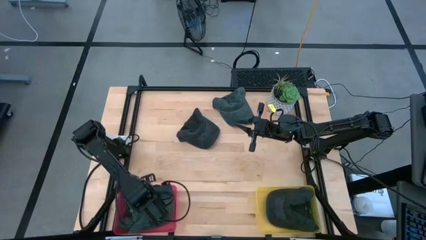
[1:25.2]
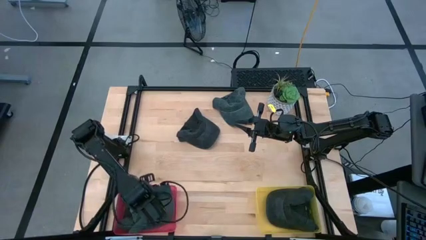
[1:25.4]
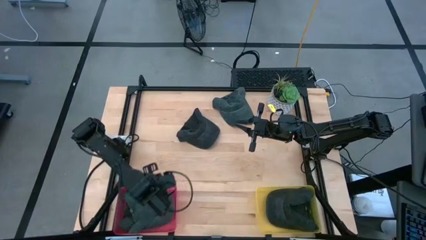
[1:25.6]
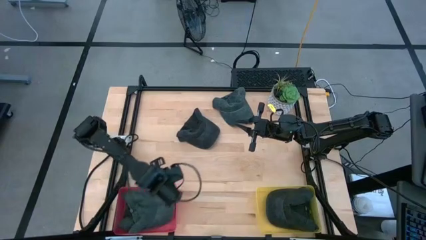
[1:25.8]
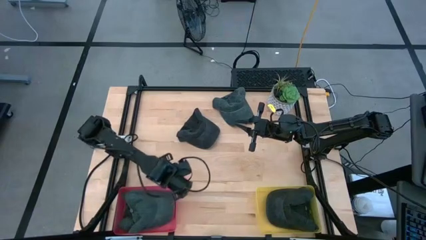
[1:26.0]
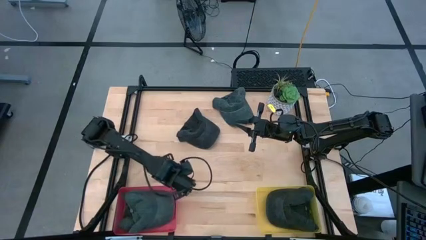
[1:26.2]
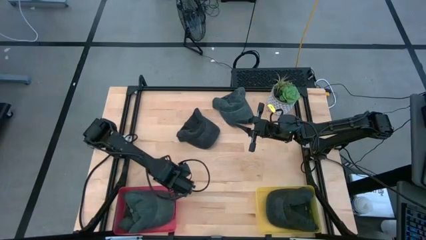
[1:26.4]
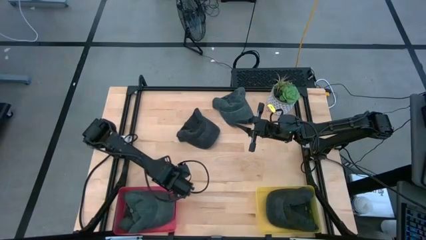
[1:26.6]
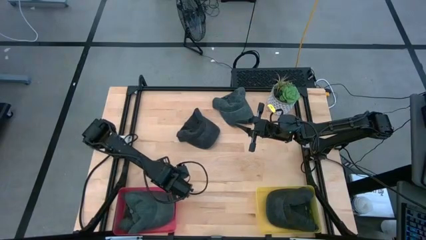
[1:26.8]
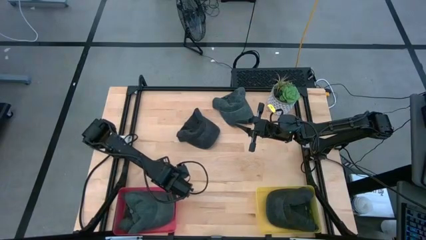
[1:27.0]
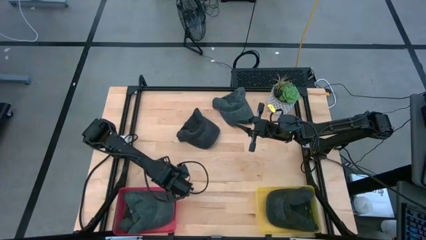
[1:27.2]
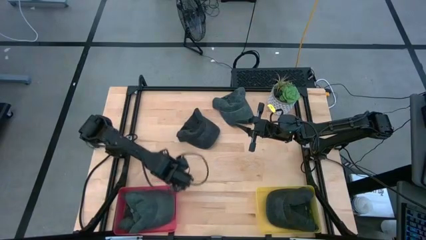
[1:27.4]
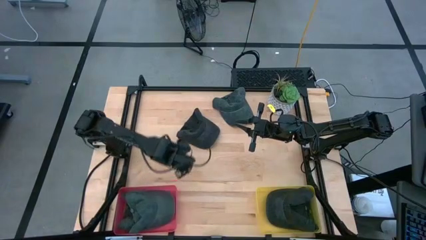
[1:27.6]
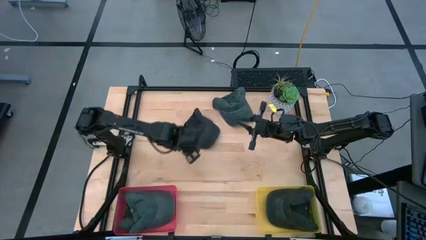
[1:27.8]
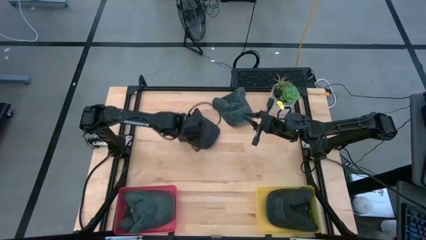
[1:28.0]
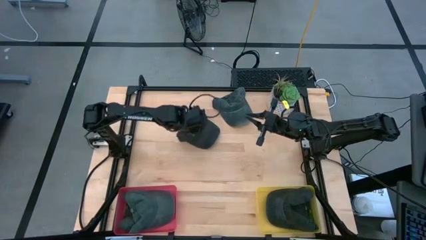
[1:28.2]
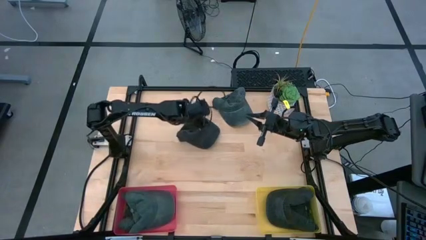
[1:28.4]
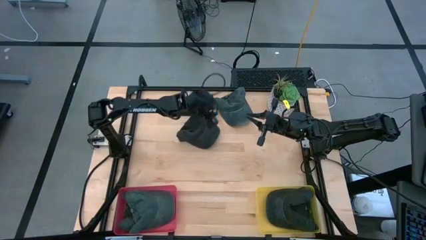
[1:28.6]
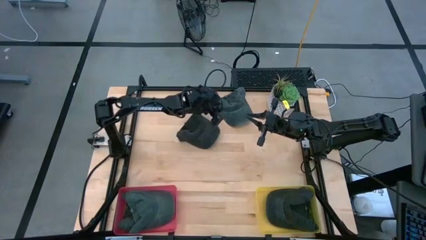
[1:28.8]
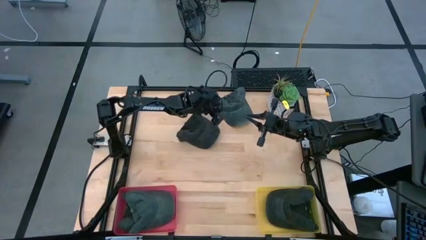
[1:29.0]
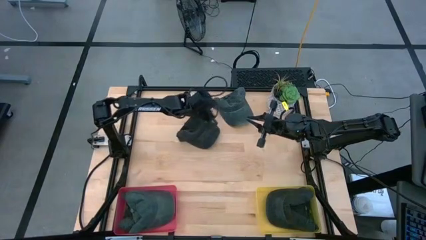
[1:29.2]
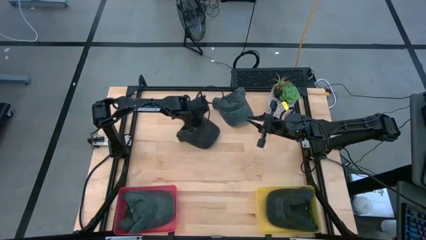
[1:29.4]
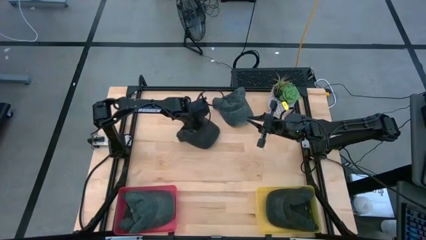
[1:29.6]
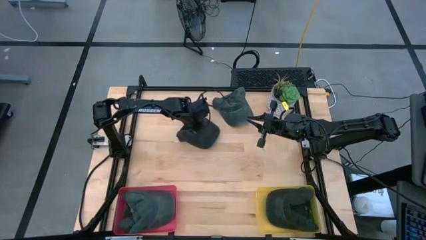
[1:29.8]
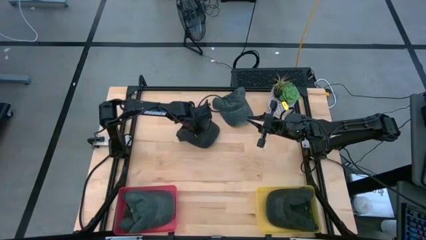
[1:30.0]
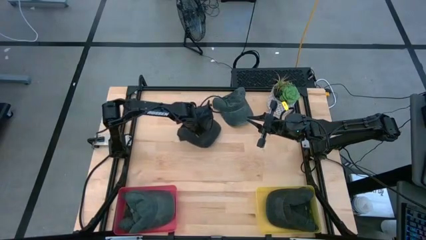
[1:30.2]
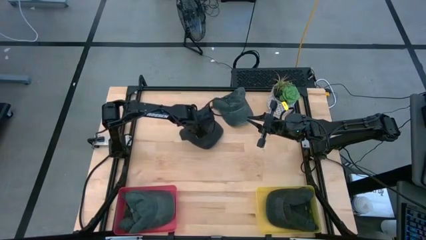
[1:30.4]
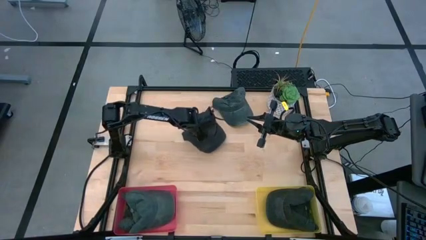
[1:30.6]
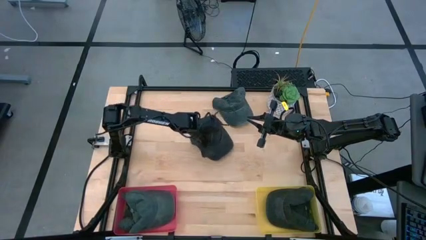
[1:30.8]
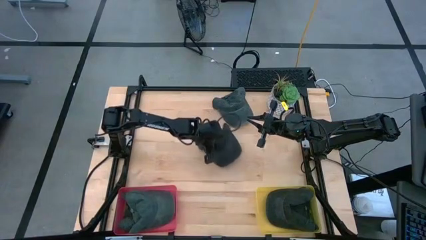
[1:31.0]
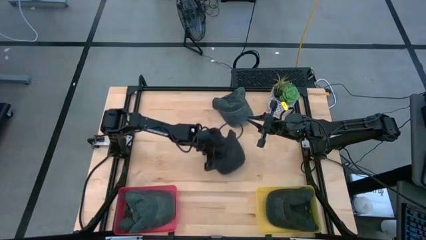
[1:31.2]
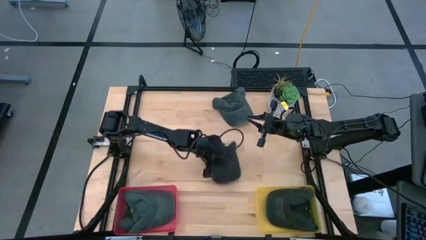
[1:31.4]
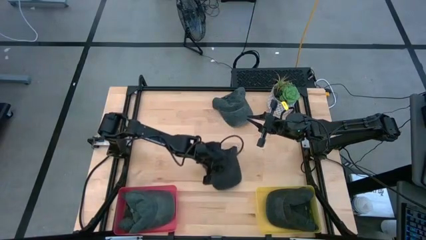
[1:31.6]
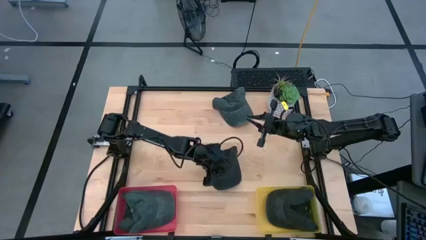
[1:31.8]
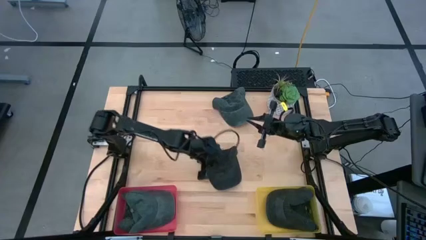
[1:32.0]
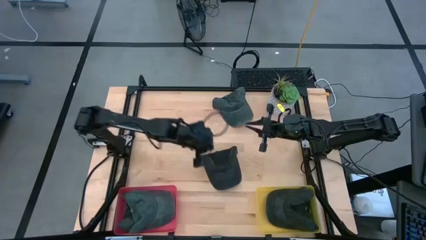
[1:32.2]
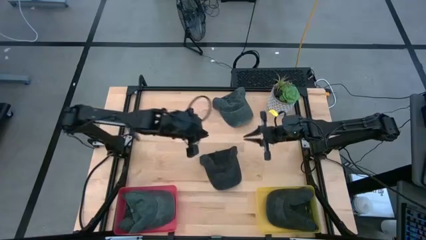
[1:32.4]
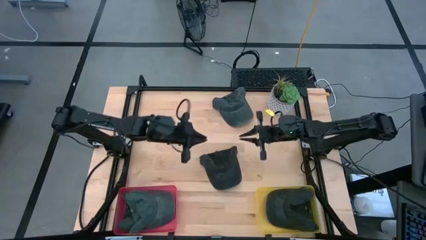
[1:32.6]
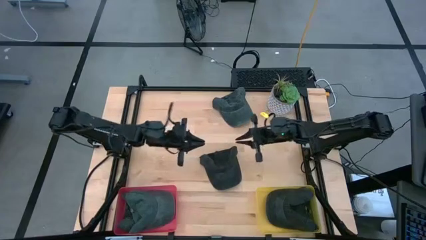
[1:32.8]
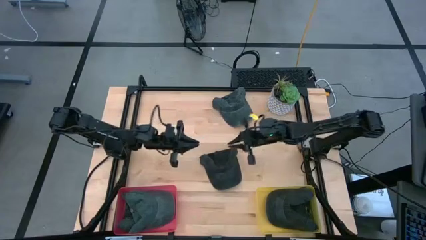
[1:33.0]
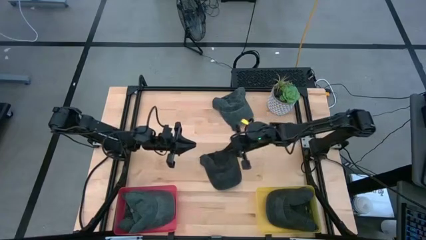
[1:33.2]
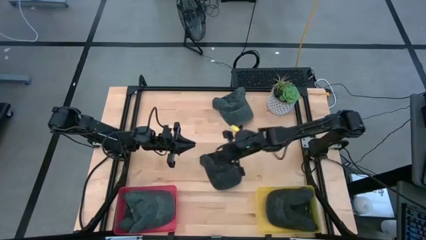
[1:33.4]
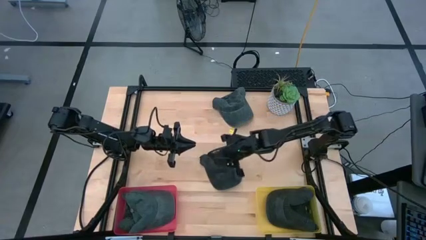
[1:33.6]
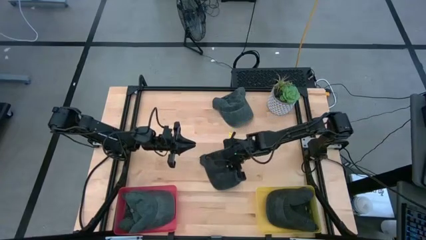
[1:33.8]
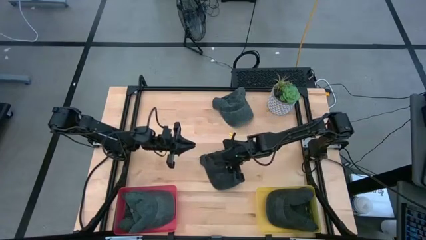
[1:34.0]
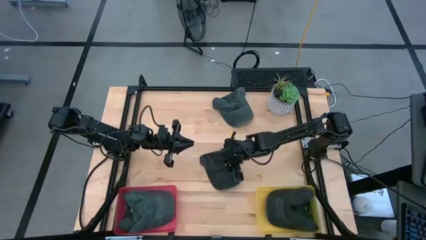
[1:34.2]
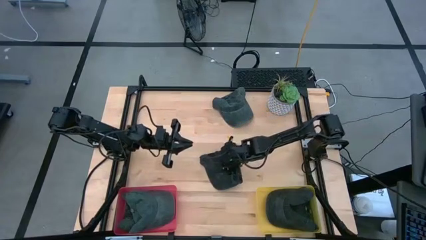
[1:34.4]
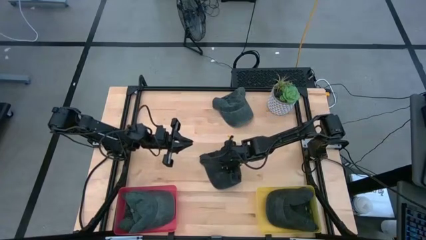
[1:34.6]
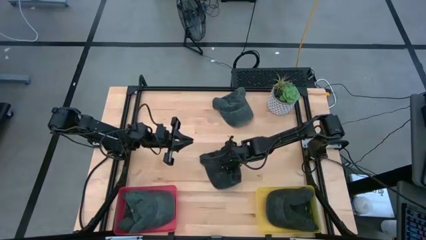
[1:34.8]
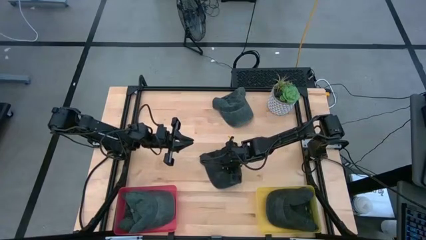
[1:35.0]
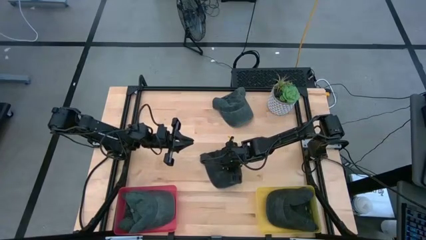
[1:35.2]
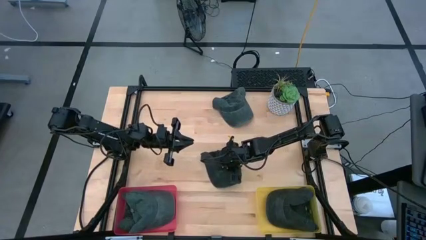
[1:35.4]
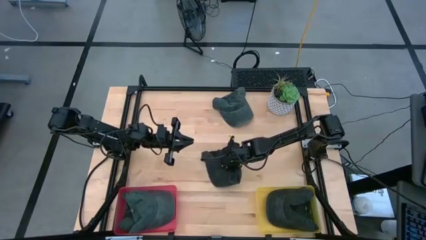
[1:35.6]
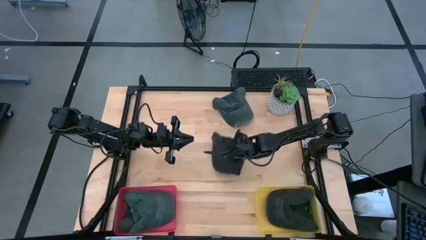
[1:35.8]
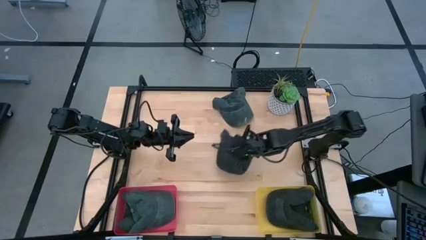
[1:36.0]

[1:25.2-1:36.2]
Task: Pick & Place hat
Put the black cap into the yellow bin

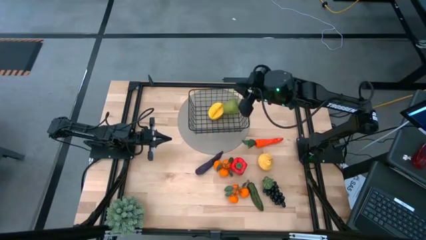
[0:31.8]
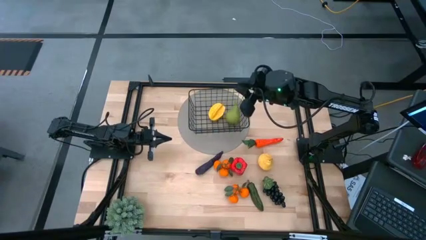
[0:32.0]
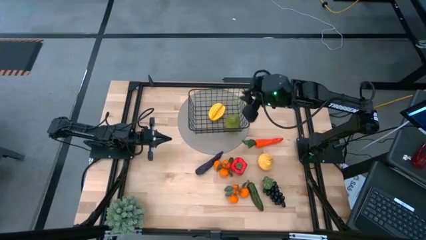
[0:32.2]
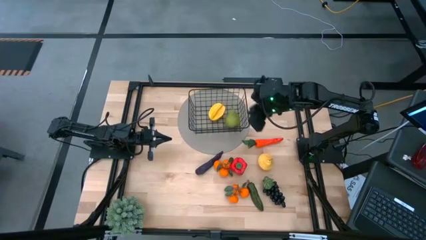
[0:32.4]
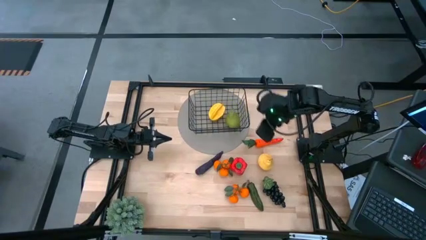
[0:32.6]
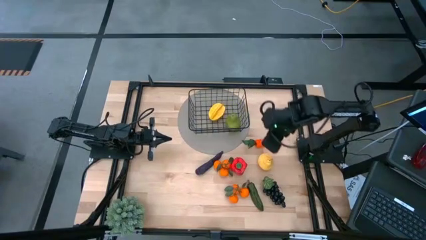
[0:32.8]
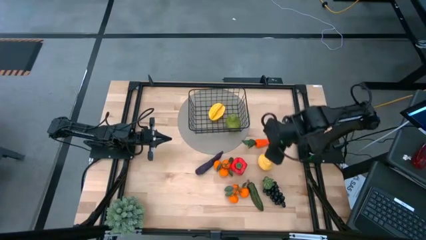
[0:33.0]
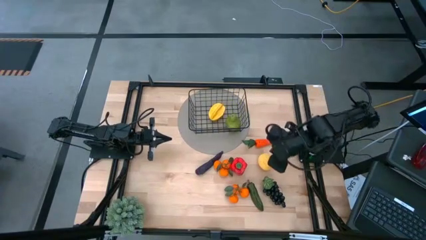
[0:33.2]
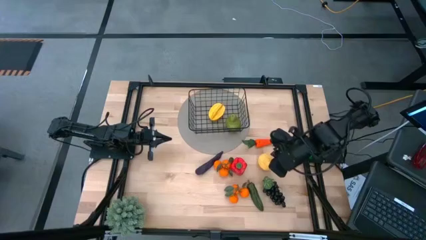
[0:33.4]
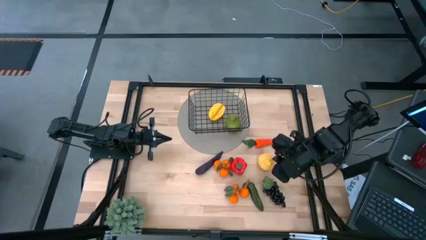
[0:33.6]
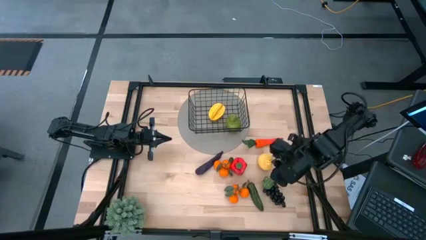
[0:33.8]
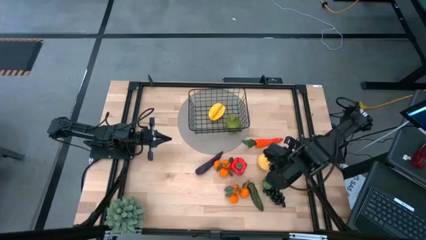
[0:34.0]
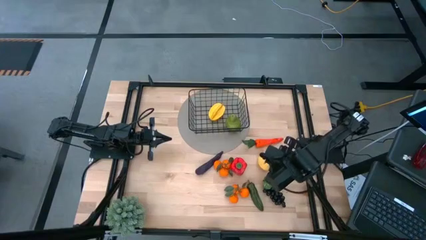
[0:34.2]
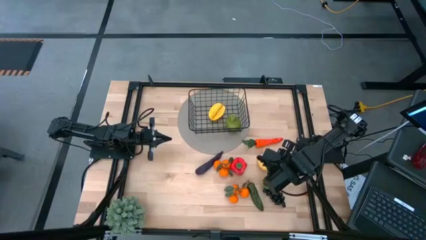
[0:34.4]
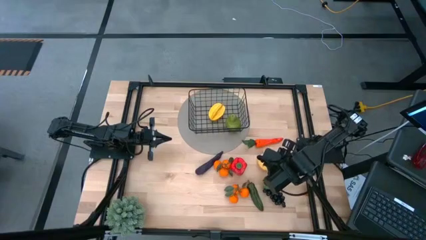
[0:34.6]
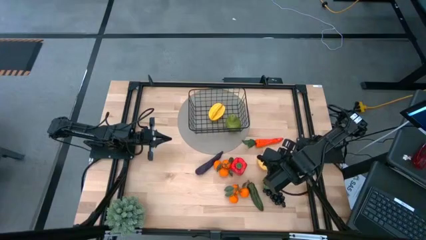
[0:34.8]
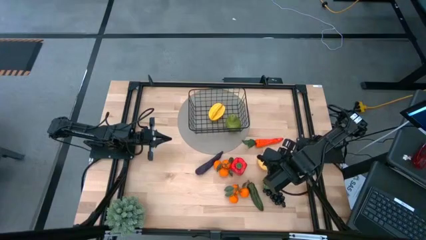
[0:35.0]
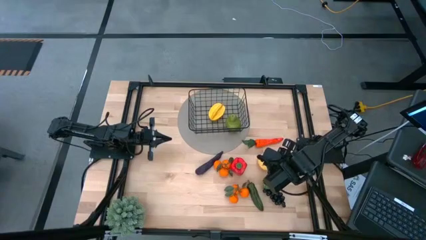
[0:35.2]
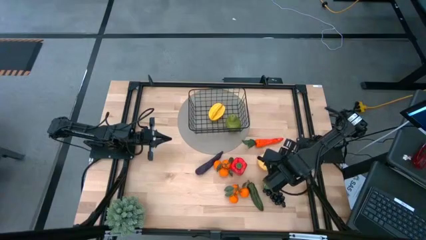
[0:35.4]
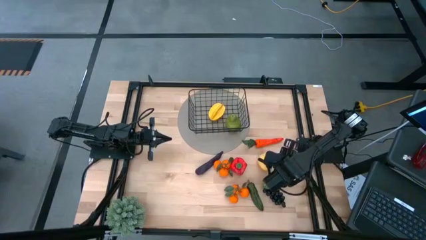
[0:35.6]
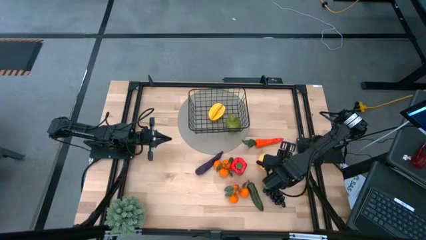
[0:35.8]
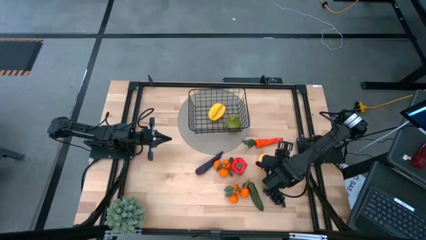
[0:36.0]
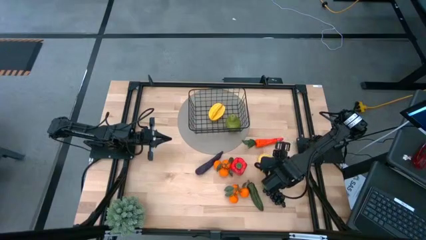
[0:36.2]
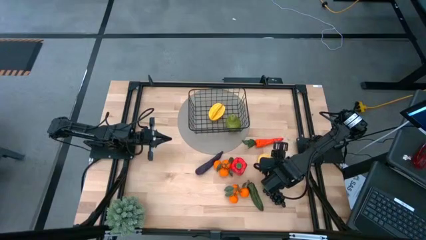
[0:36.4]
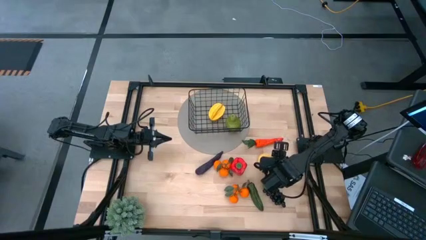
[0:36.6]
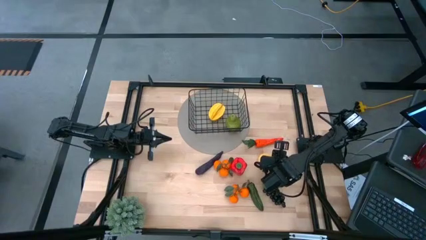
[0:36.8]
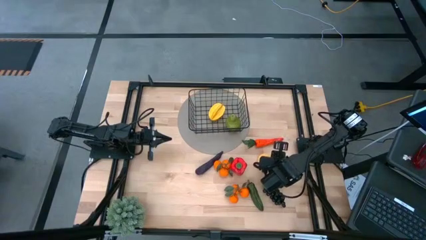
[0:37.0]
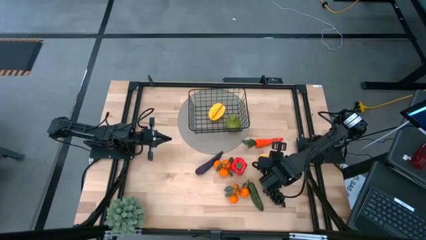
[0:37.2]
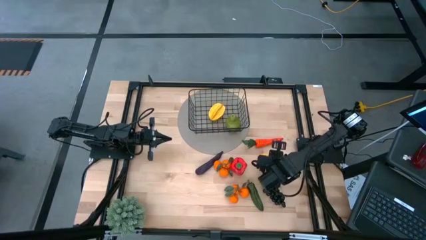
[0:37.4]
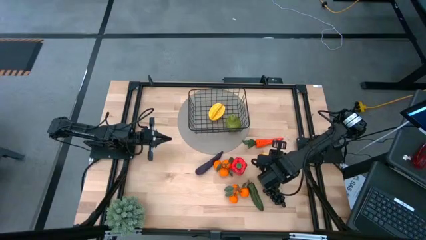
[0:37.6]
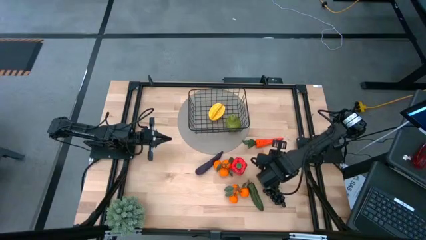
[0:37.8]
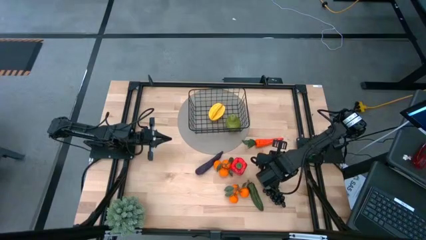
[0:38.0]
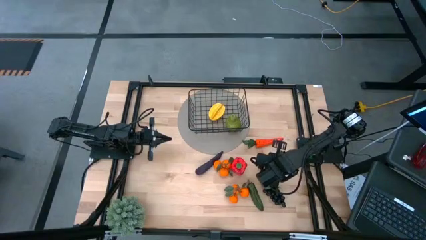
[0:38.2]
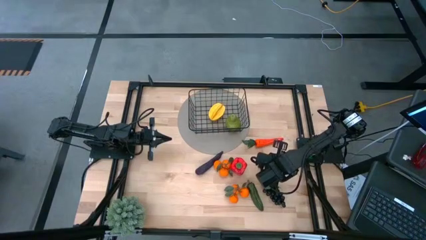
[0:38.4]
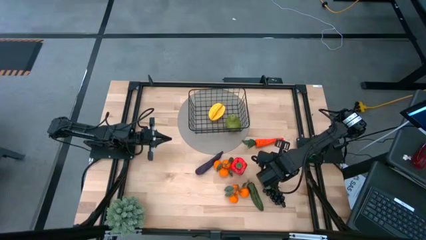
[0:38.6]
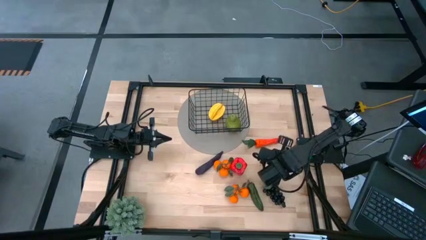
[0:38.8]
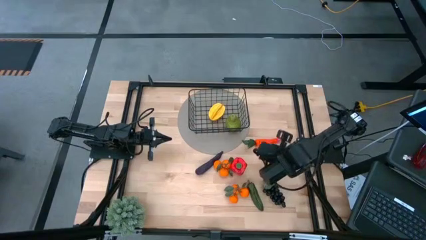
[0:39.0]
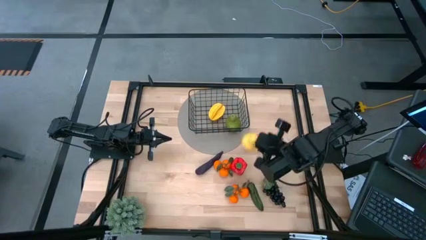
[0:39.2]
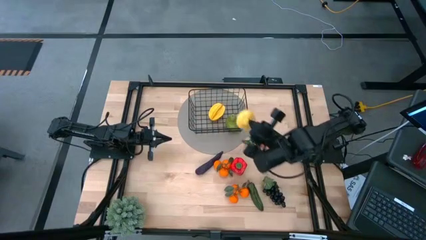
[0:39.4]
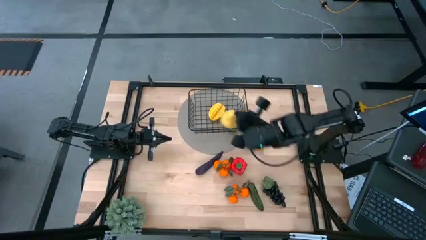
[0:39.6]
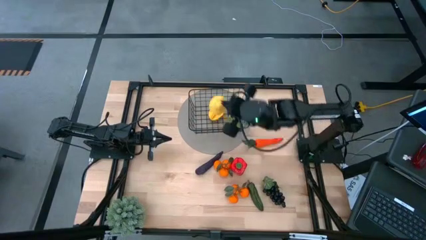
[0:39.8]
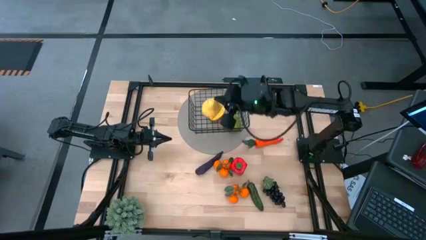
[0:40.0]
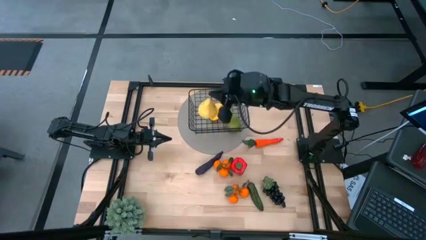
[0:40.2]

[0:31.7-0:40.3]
Task: Build produce basket
Put the yellow pear into the black wire basket
